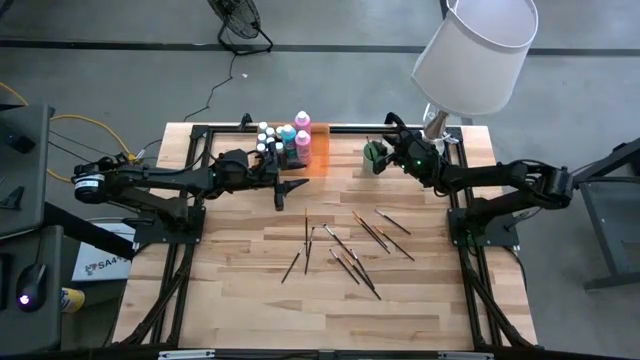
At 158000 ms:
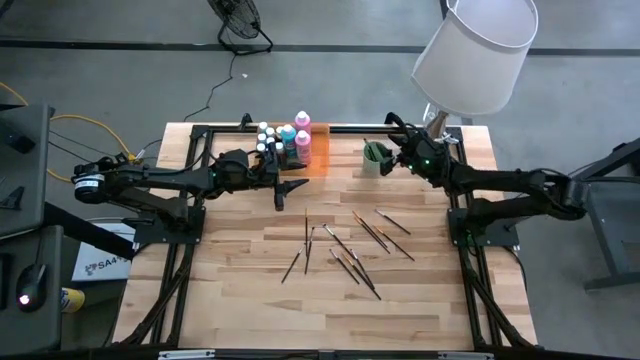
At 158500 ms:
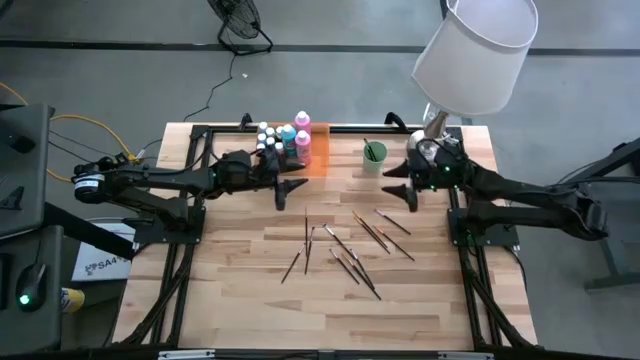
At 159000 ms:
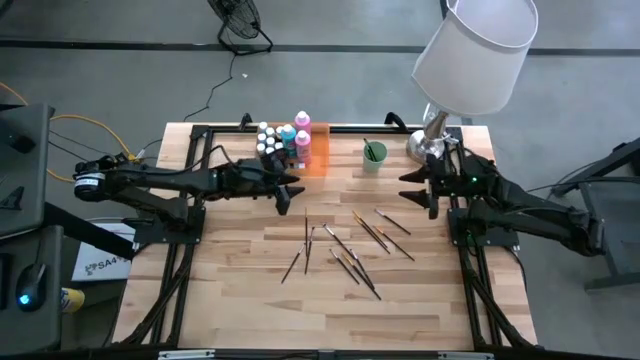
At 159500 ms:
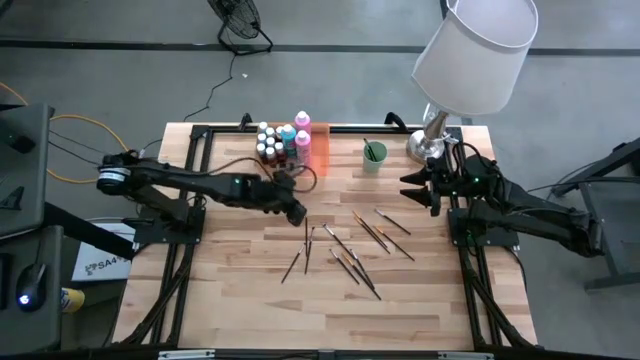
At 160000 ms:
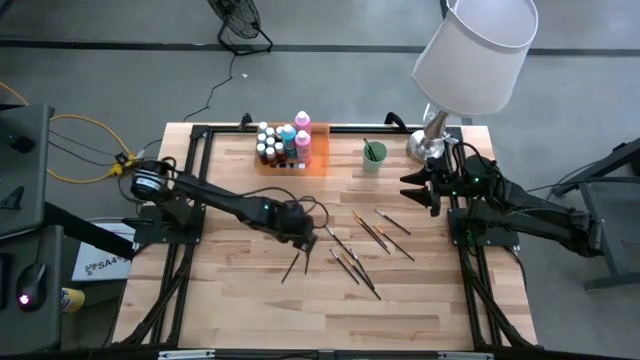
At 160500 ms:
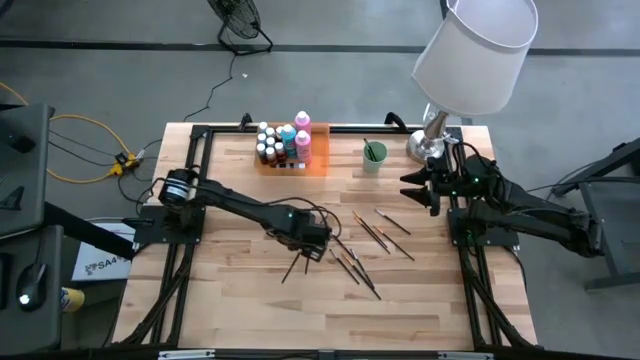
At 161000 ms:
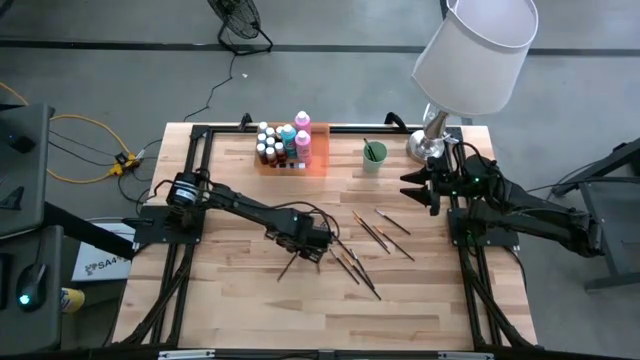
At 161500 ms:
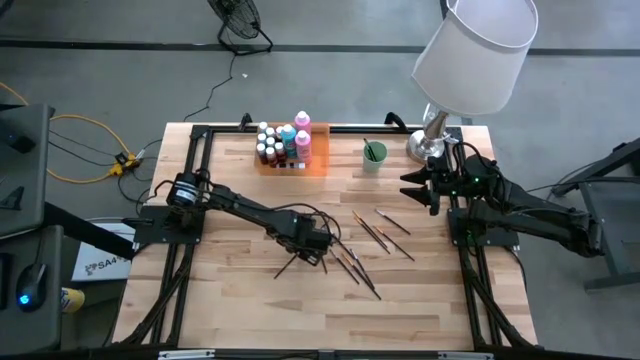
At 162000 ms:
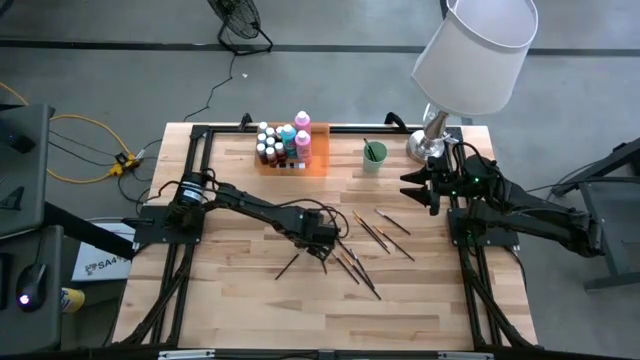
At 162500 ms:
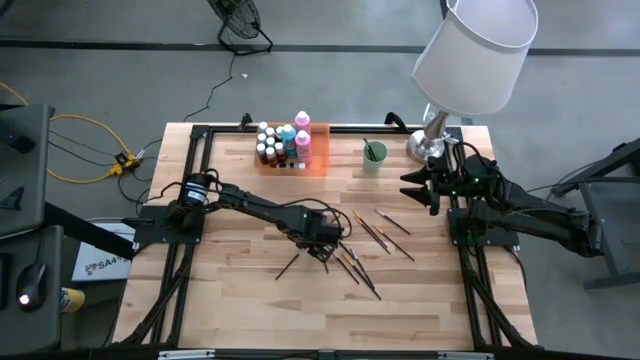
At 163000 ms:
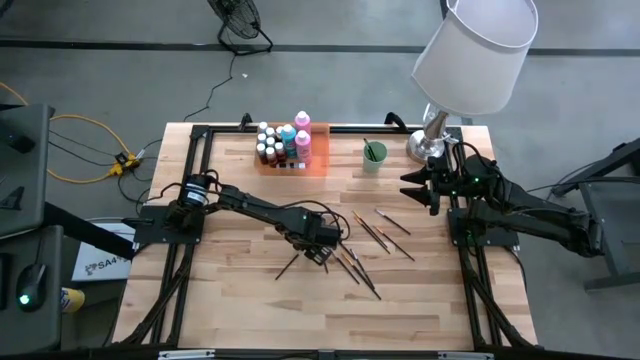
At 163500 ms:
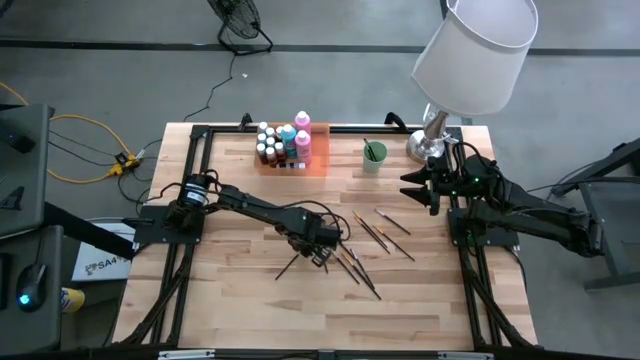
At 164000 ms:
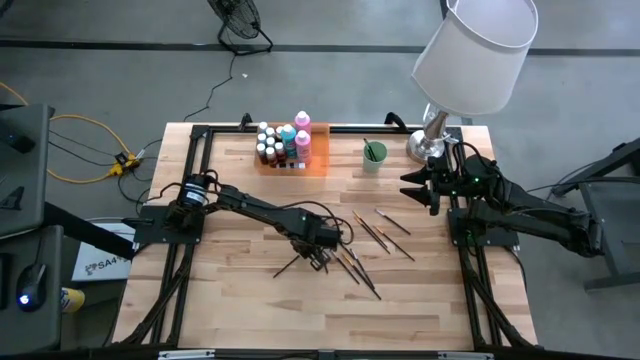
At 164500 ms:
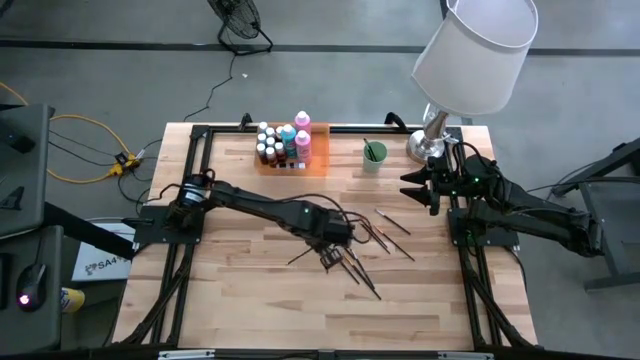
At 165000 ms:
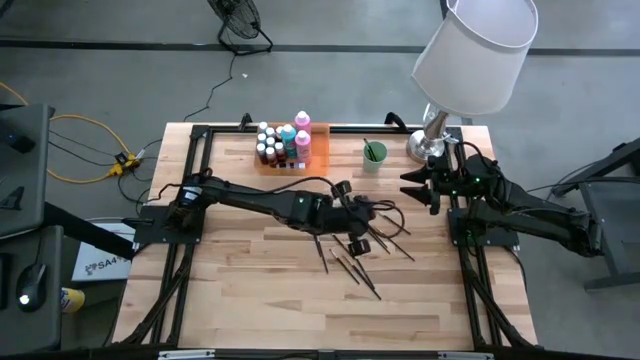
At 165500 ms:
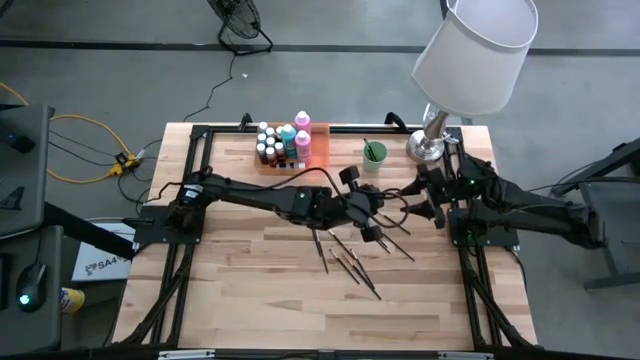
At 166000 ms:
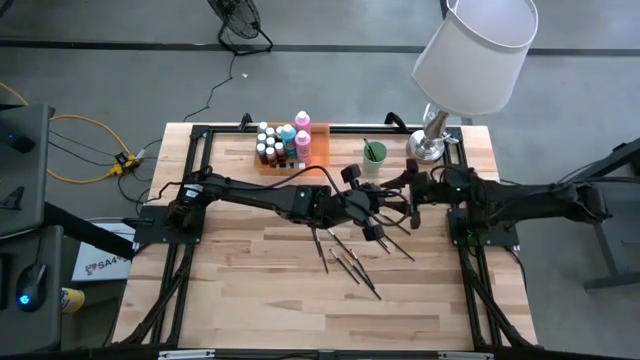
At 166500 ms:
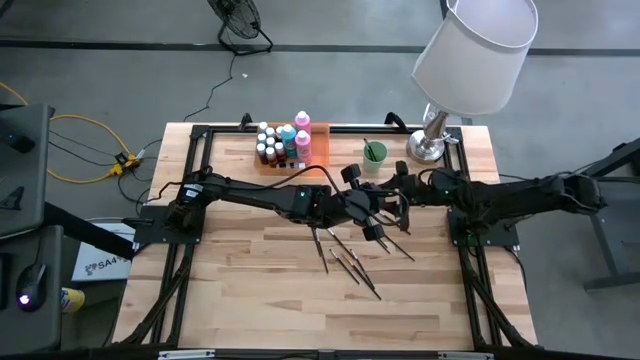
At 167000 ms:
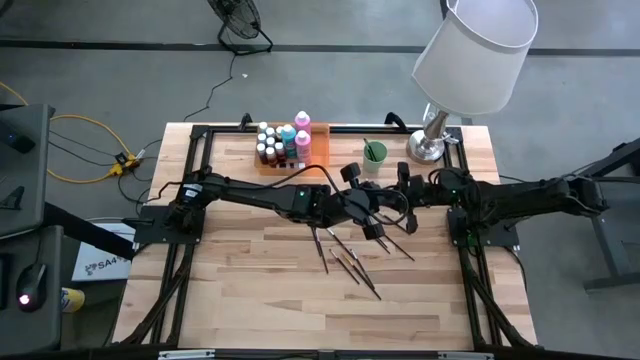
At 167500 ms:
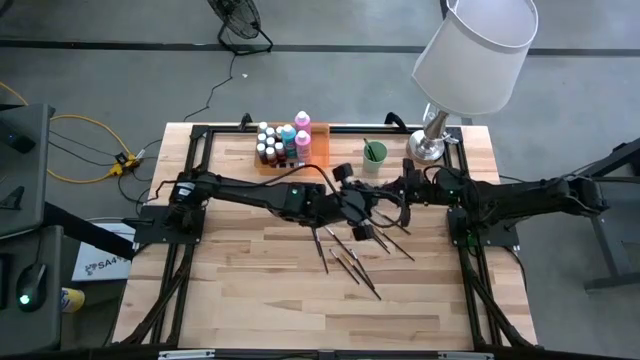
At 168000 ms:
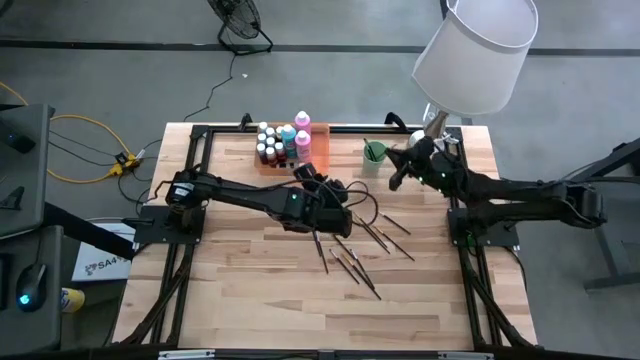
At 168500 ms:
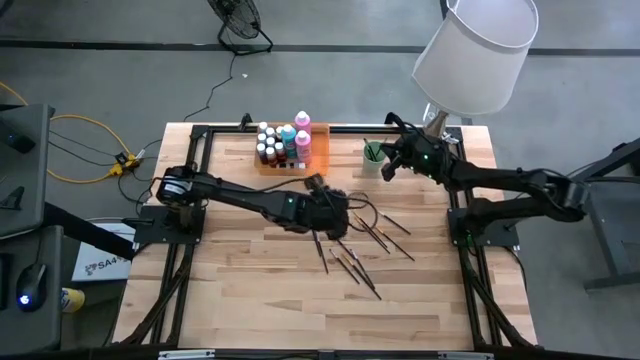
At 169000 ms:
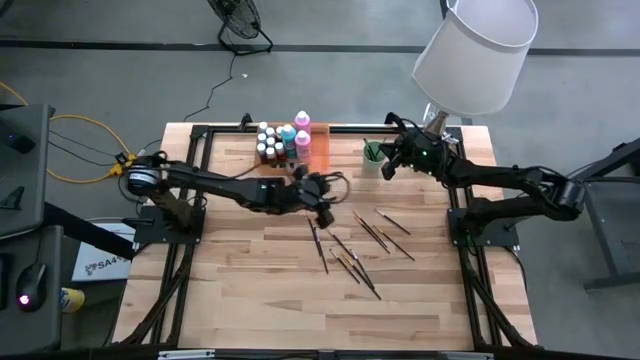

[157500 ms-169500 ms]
Task: Pick & Place Paint Supplies
Put the silver paint brush into the green cup

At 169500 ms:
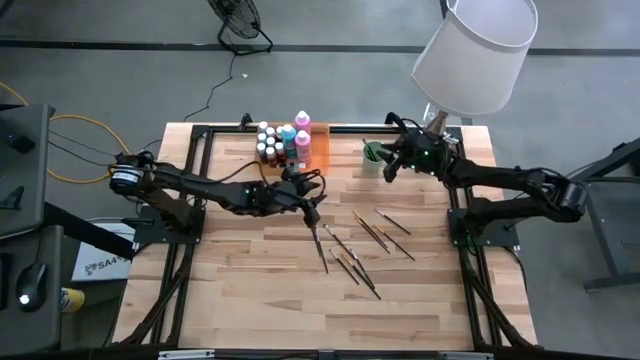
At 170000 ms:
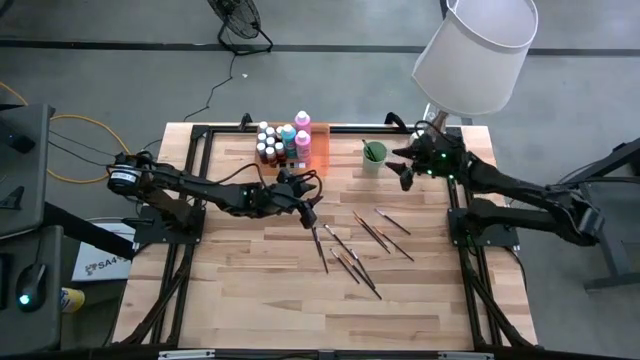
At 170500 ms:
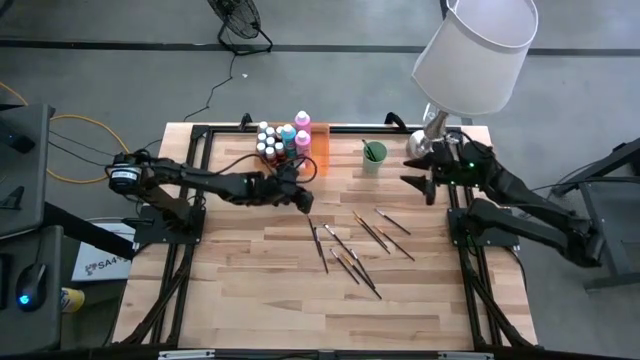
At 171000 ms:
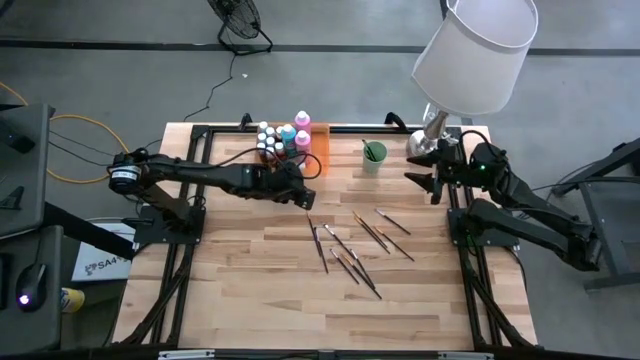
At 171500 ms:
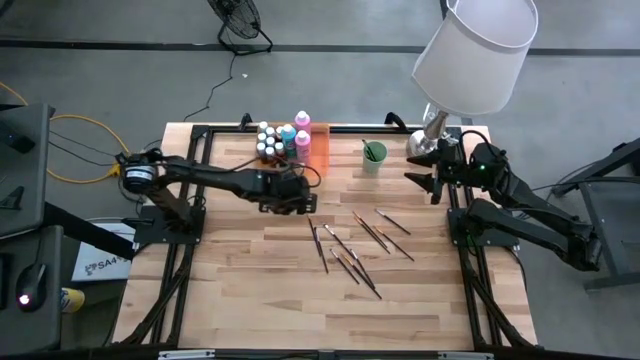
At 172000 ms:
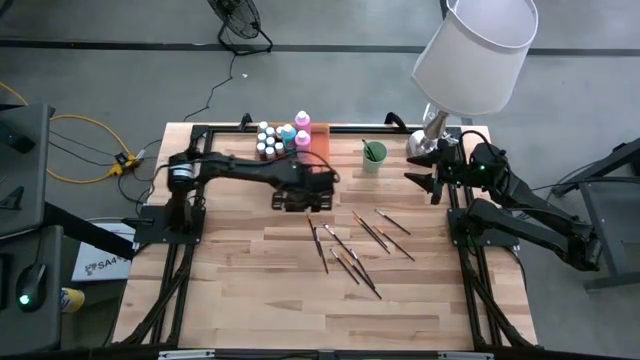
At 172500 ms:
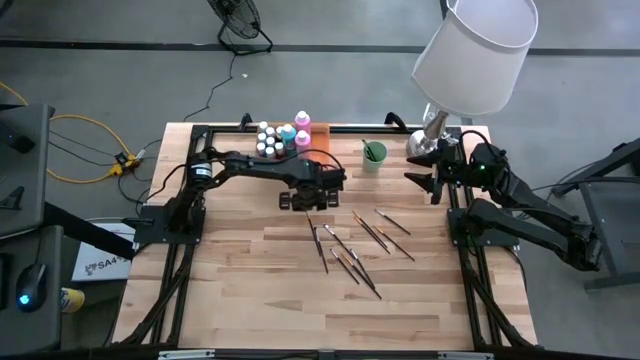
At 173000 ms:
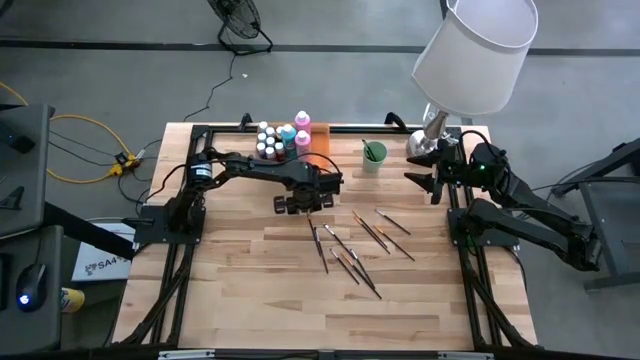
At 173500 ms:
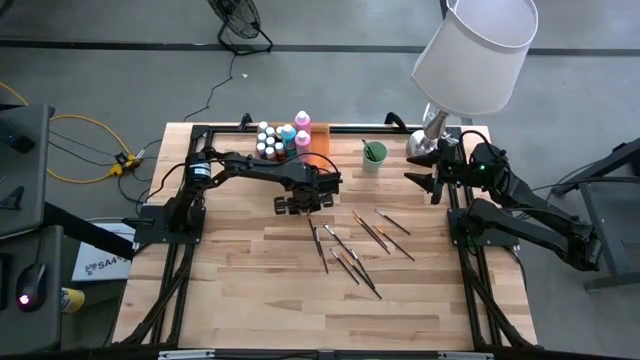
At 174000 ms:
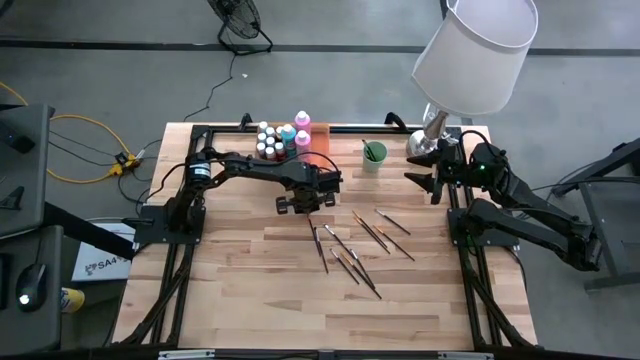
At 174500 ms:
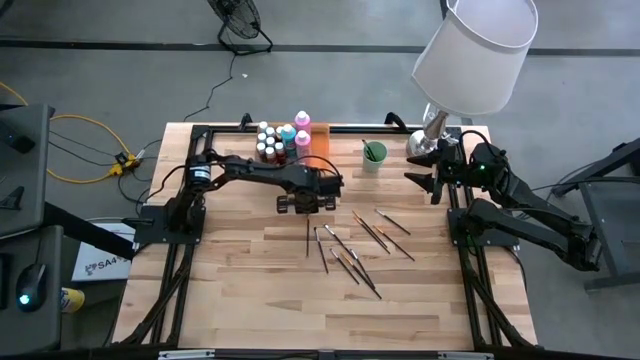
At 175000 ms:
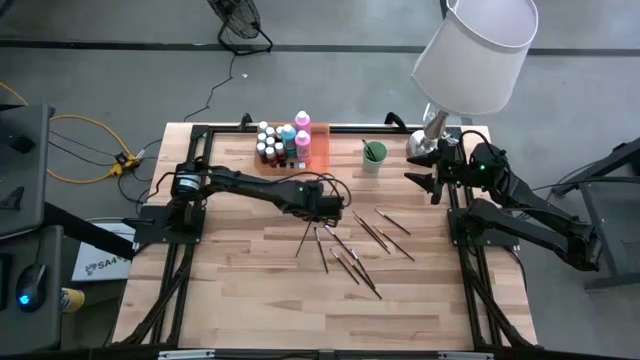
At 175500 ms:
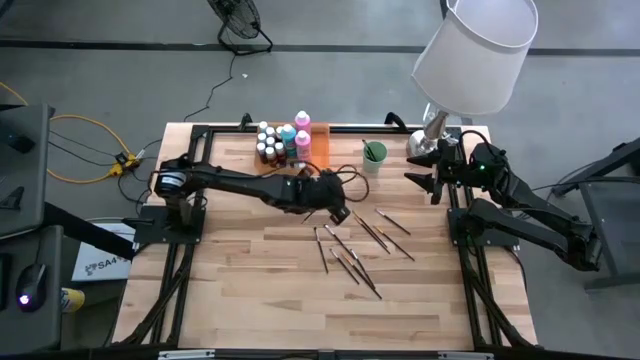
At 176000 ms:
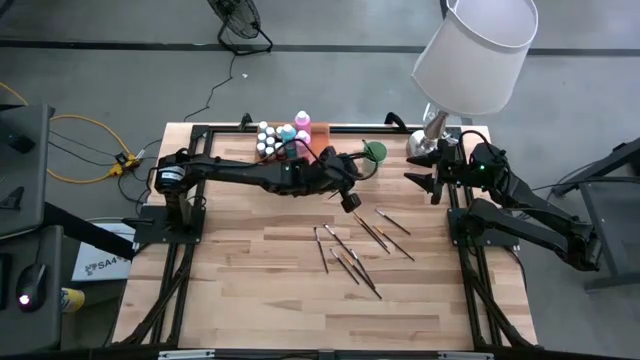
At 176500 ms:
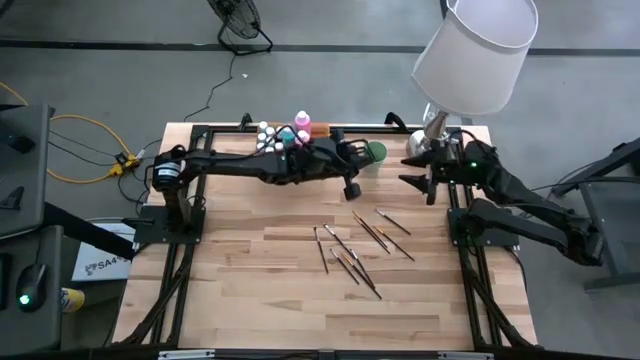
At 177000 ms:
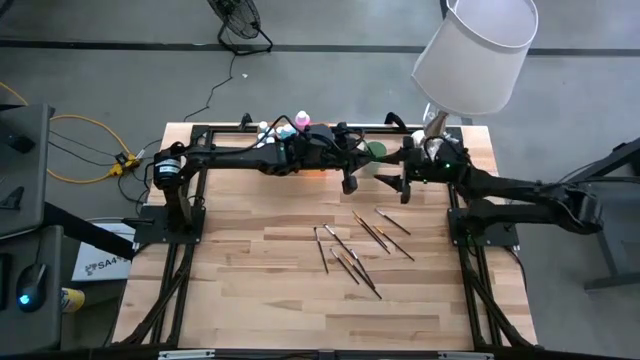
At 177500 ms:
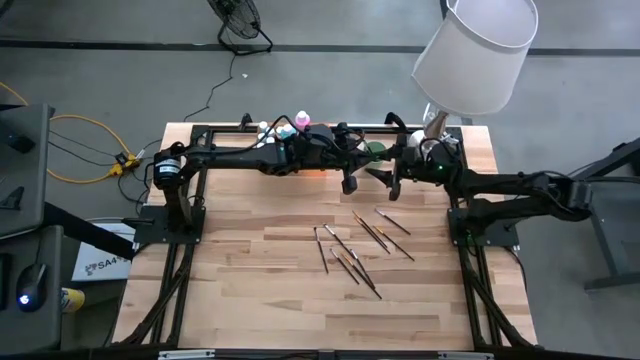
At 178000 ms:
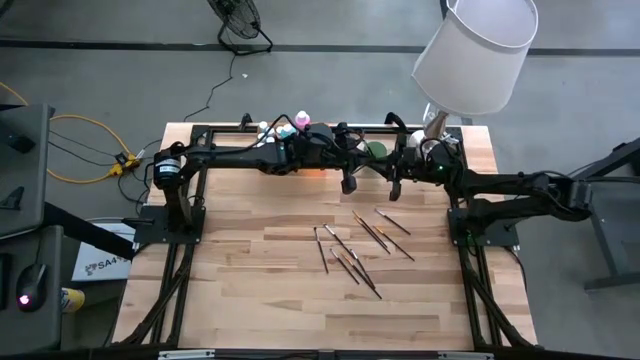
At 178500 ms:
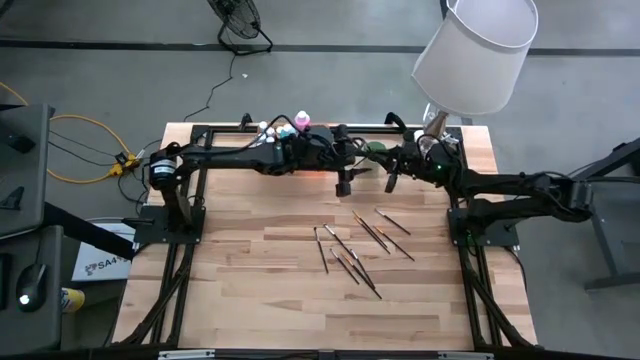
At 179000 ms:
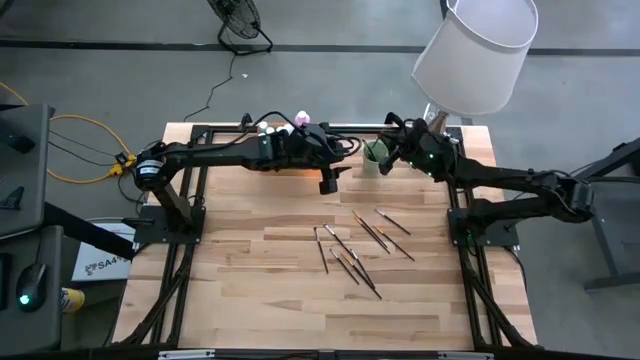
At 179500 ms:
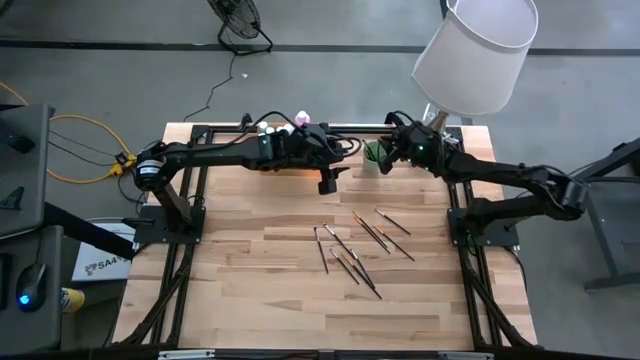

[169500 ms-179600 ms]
Put the gold paint brush into the green cup
